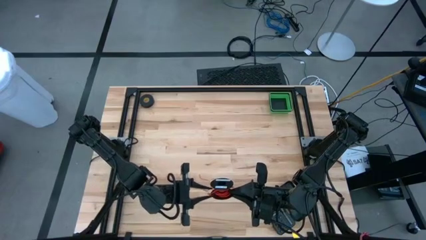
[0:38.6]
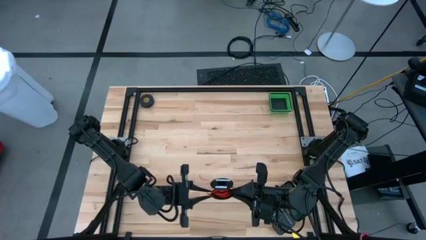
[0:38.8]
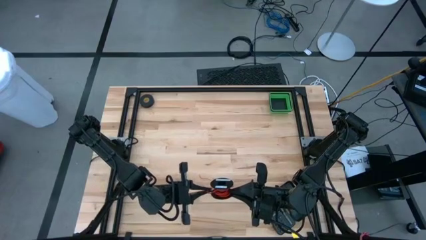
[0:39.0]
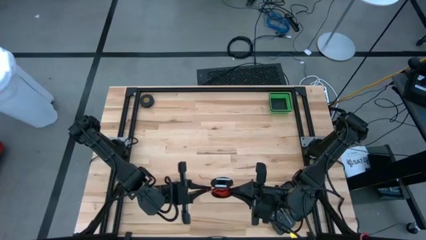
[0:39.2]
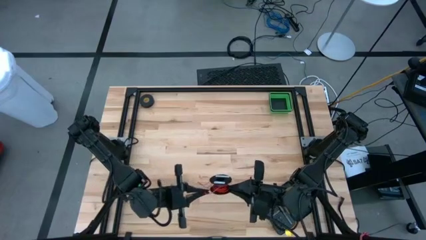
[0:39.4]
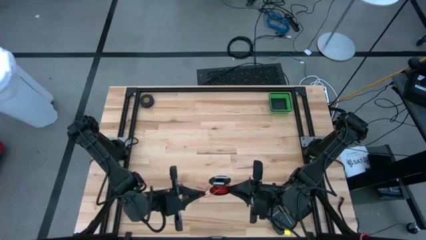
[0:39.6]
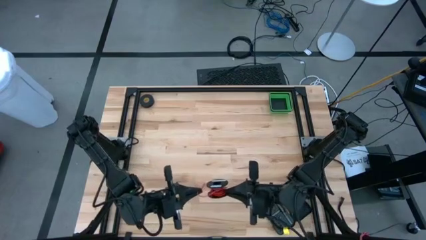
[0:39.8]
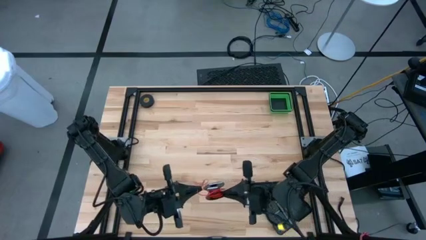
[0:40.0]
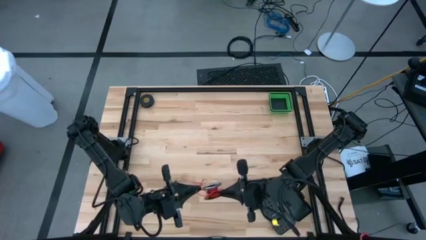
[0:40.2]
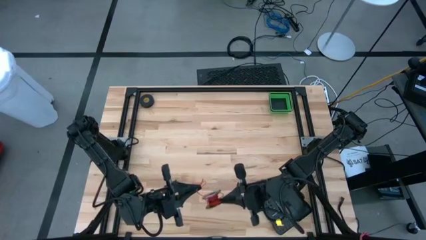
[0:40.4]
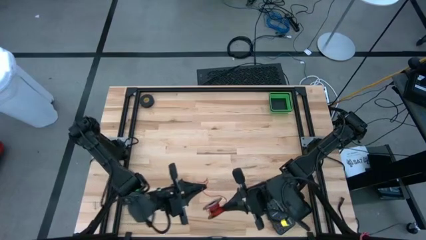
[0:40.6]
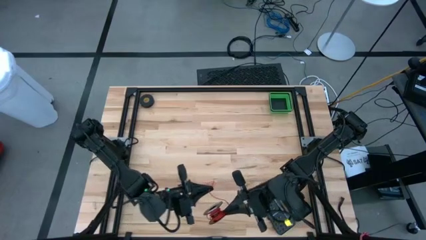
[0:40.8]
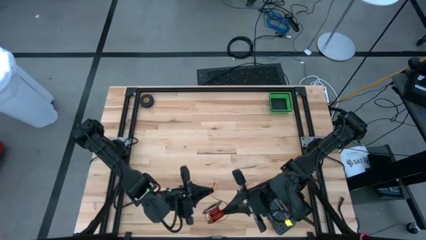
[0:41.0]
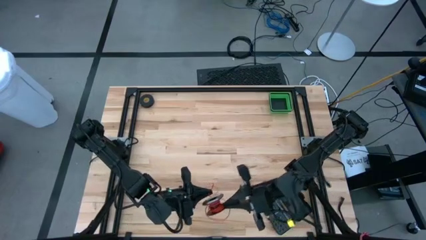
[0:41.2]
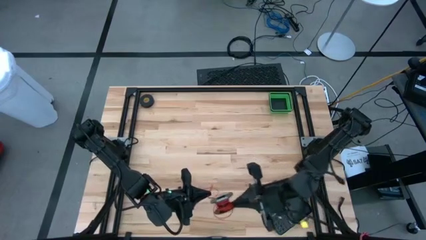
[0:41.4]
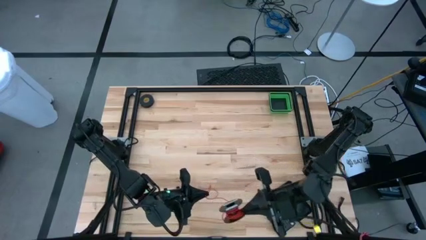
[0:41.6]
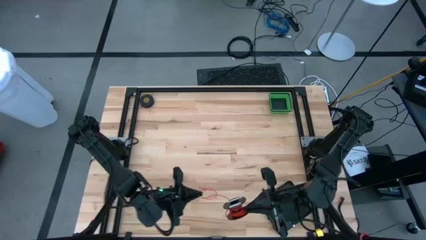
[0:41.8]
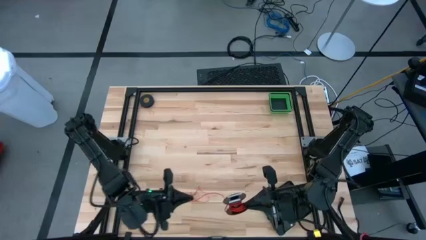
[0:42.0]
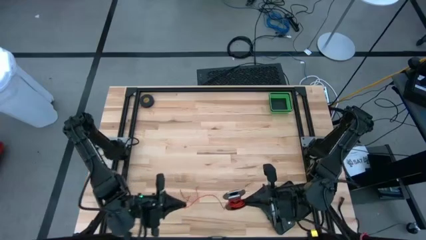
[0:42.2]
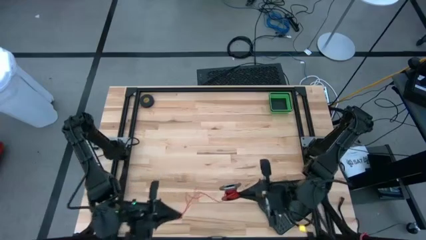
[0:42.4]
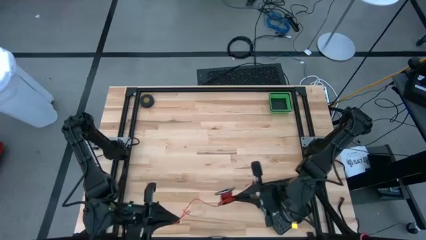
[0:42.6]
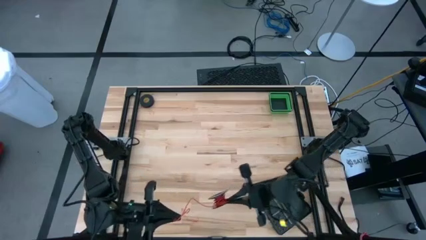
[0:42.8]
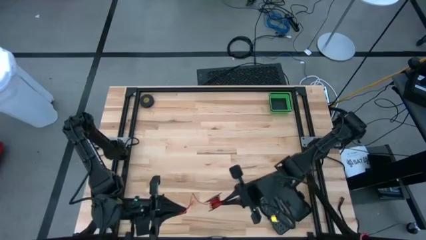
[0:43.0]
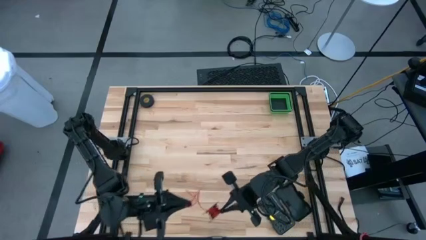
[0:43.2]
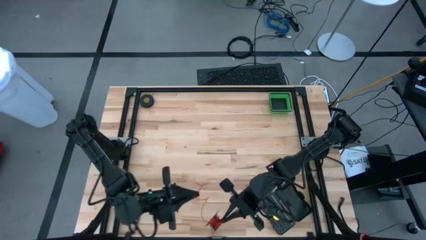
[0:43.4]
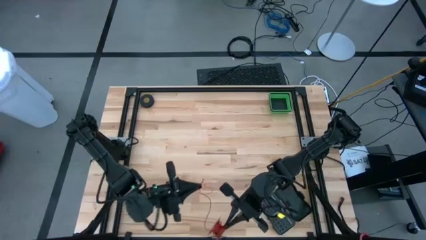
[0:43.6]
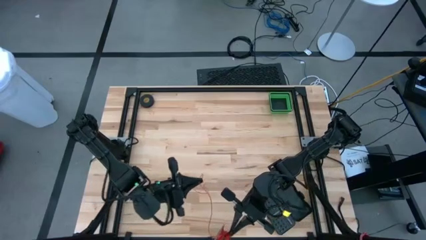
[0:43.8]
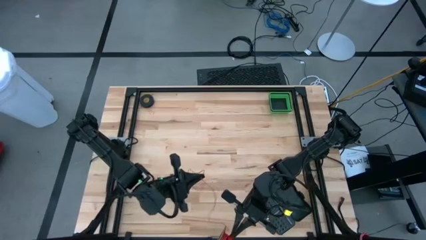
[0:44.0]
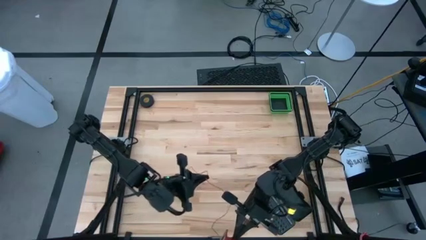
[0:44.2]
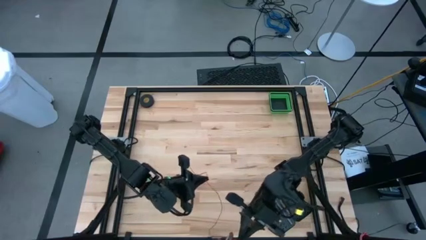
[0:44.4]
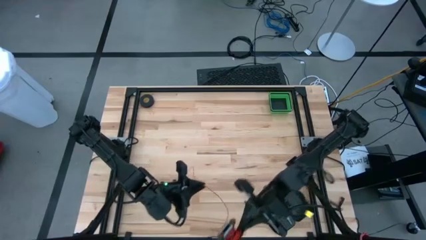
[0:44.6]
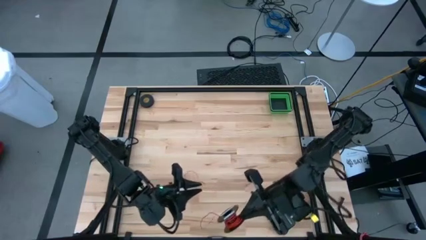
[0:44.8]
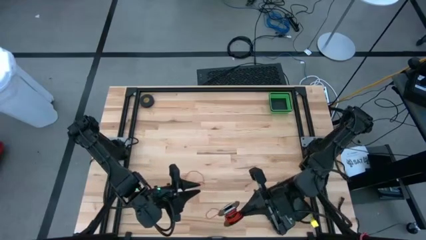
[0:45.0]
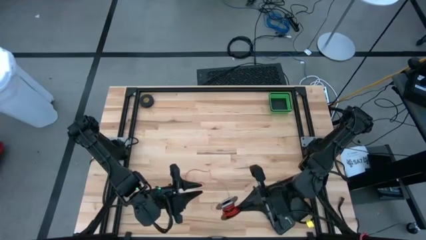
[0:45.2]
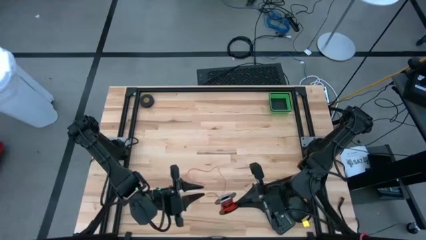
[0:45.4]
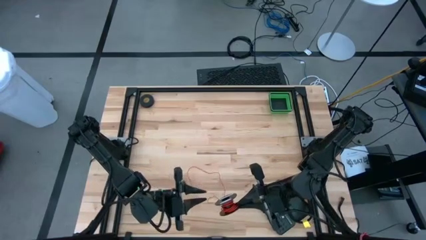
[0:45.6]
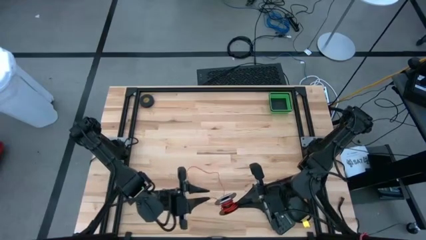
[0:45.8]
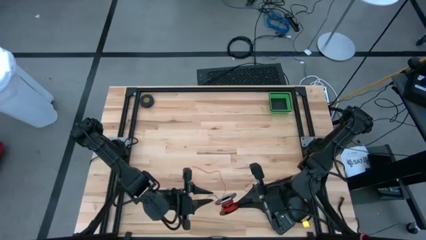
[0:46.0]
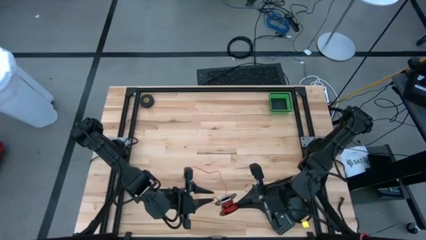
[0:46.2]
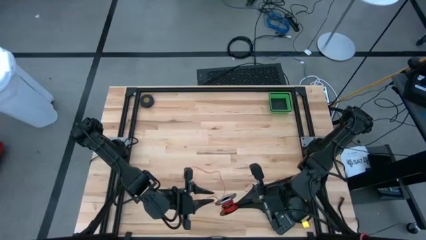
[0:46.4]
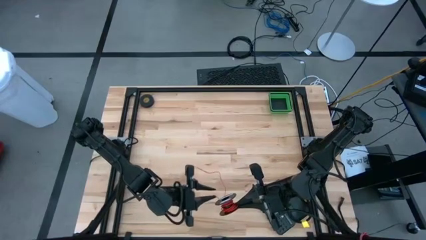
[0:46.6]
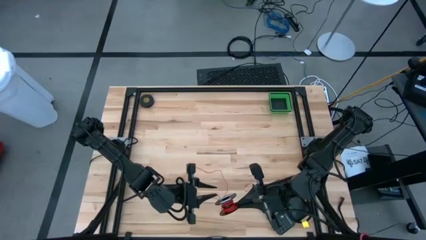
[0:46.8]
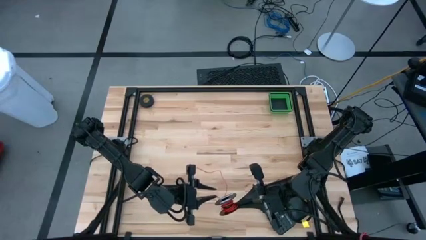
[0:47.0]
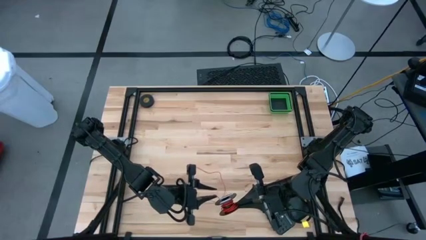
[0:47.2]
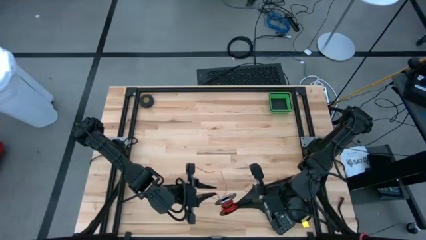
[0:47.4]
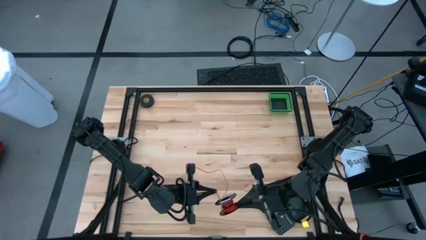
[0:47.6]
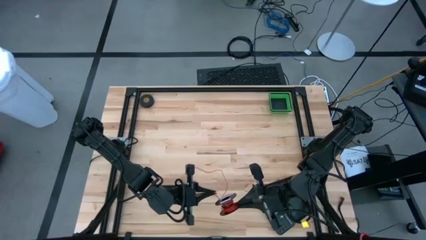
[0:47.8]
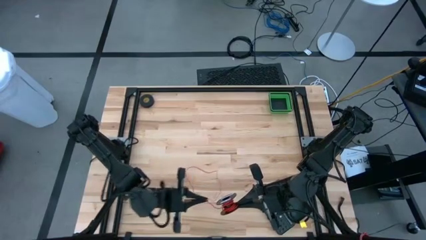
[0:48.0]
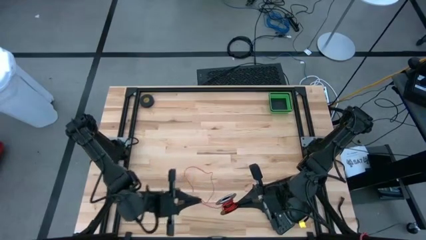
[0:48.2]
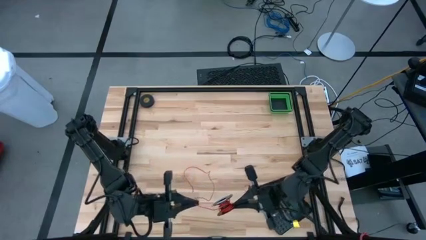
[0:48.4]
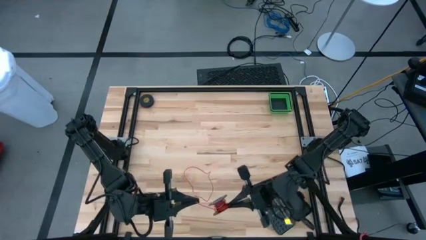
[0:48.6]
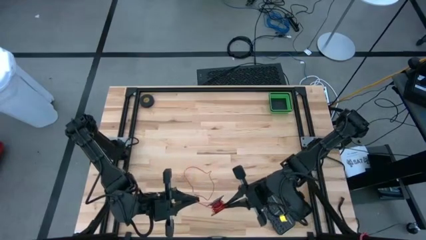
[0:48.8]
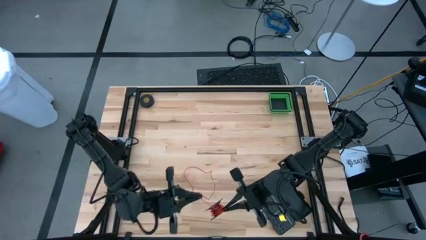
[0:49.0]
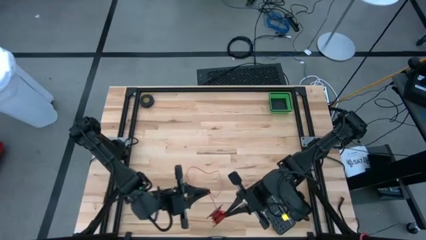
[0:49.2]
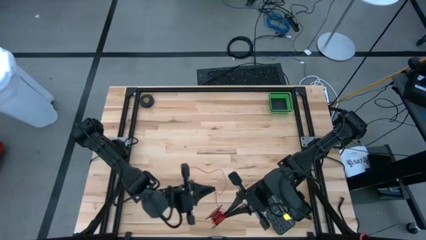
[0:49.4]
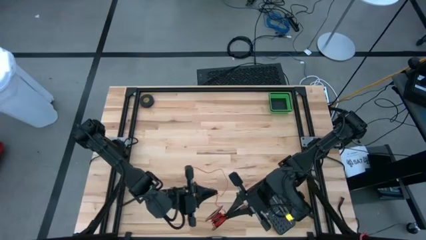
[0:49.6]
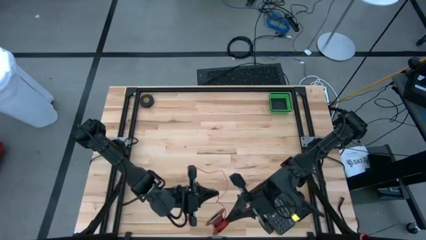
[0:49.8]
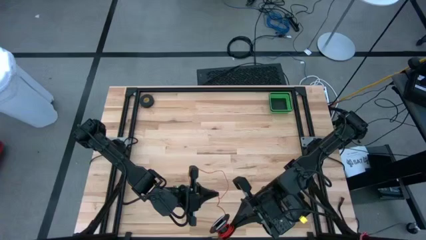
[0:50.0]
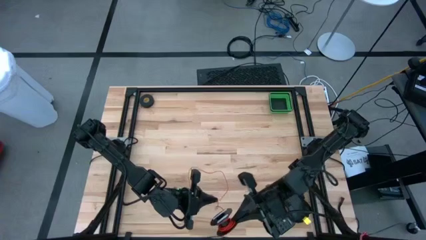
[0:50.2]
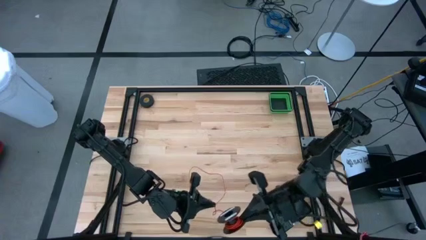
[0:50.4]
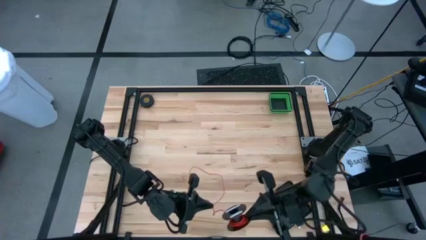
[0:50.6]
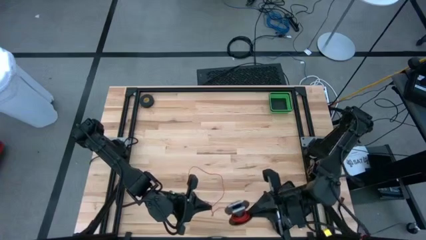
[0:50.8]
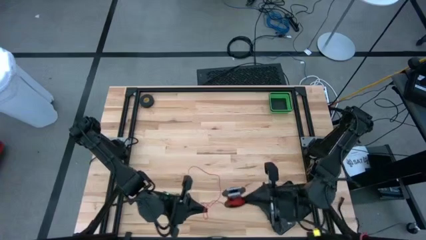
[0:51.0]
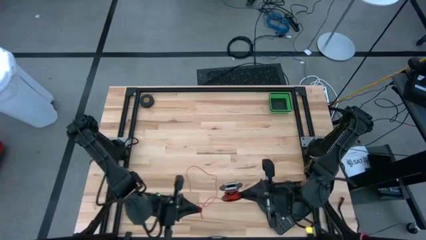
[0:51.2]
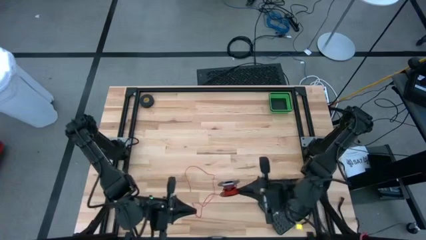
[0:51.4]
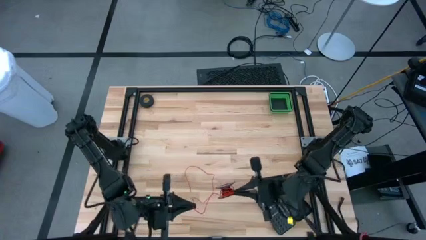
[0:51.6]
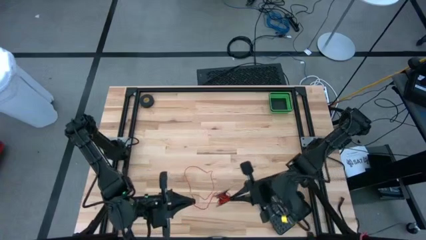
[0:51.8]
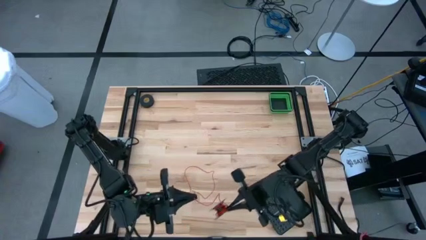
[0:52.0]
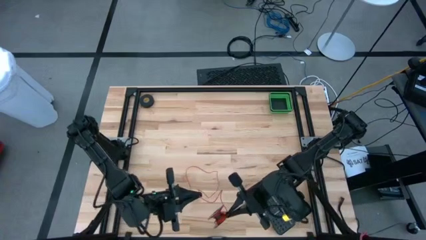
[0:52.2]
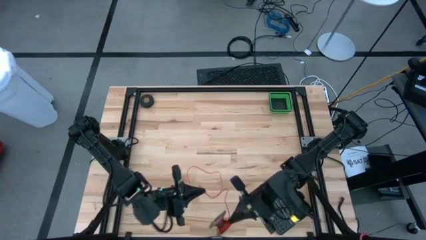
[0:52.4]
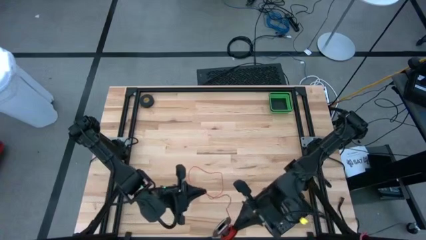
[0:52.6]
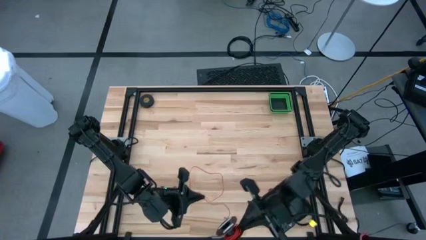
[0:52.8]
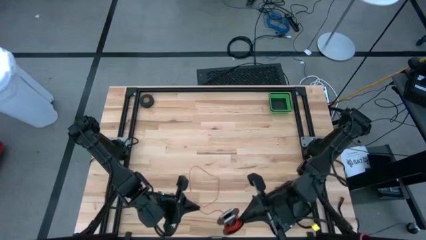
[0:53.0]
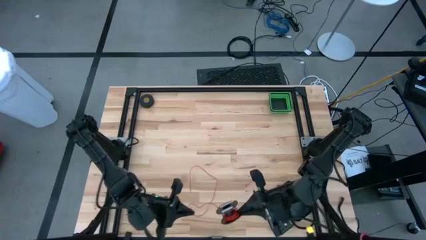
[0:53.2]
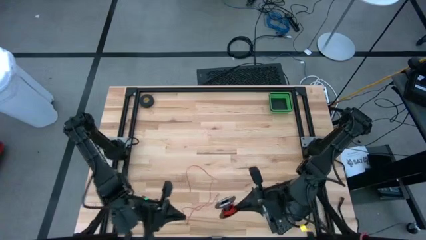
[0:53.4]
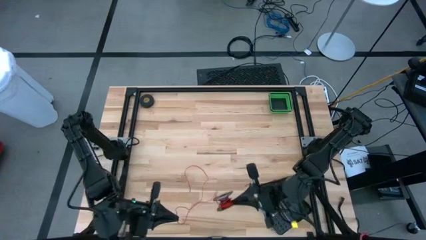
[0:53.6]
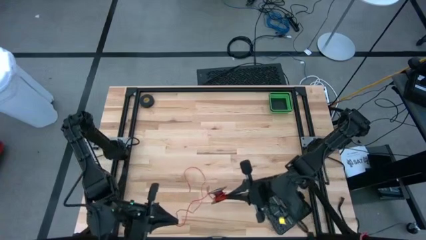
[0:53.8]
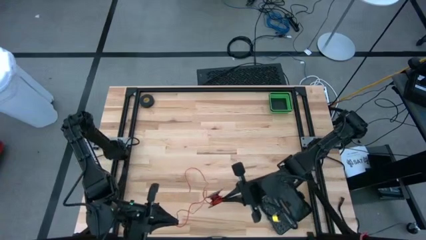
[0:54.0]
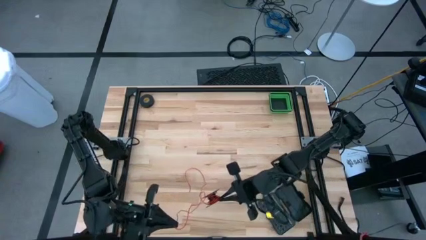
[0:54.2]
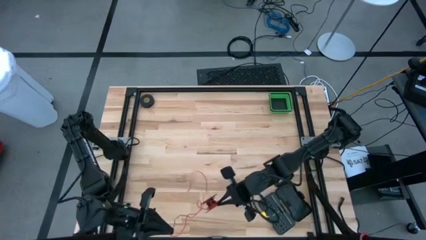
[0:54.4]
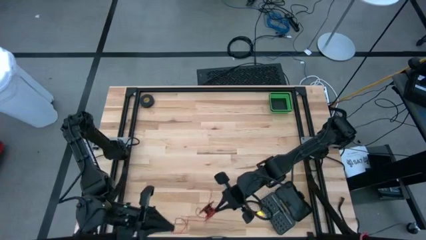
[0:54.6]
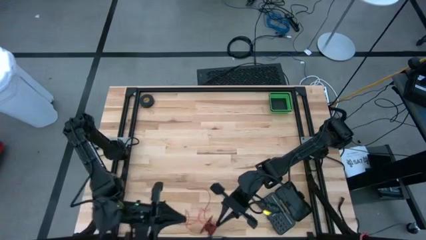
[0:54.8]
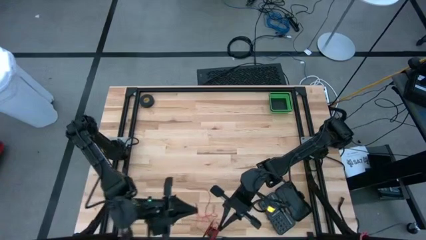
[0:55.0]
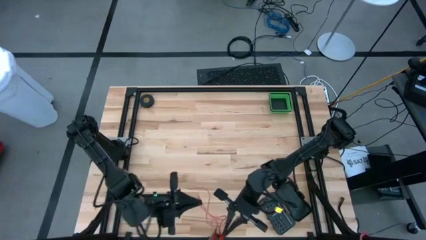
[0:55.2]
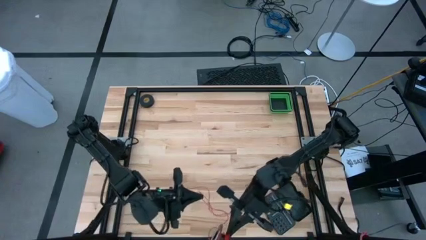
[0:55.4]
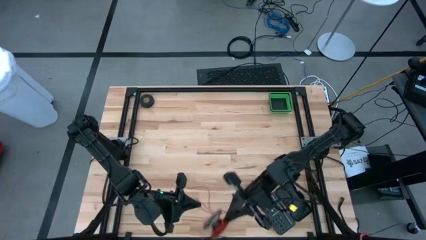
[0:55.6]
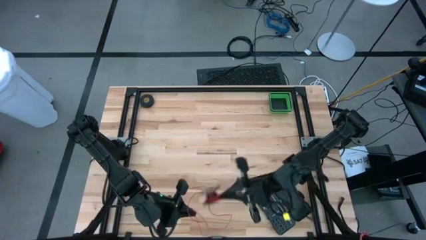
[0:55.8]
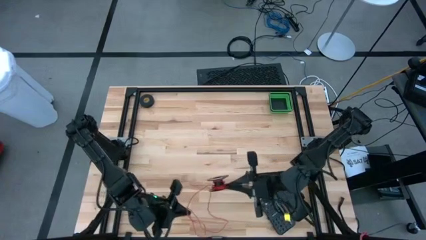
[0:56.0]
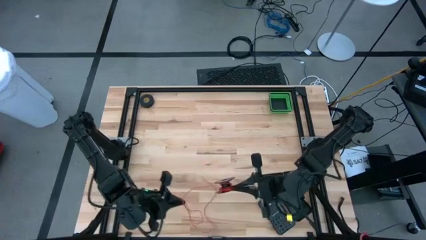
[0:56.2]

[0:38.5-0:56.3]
Task: Coil cords
Uncoil the red wire on the black spool
